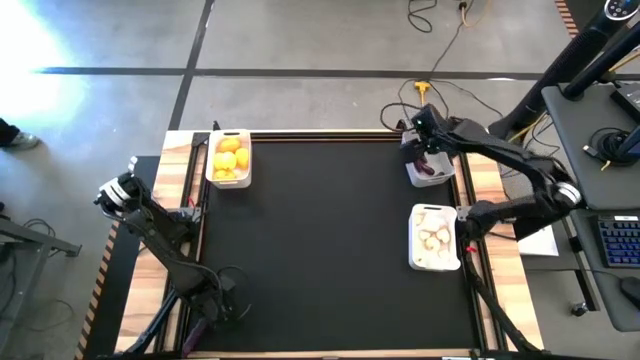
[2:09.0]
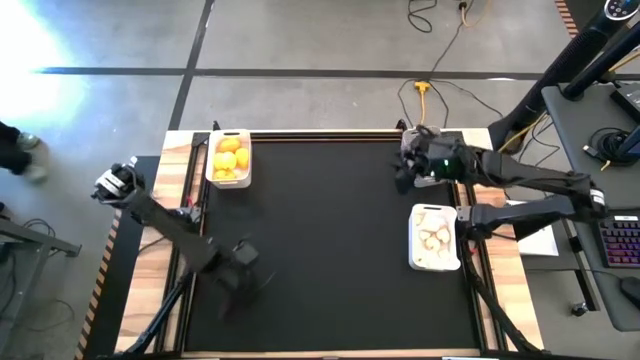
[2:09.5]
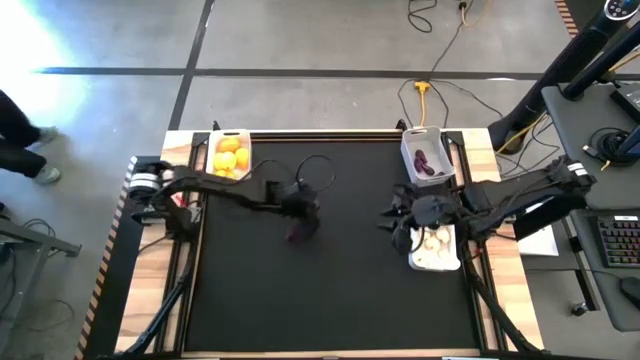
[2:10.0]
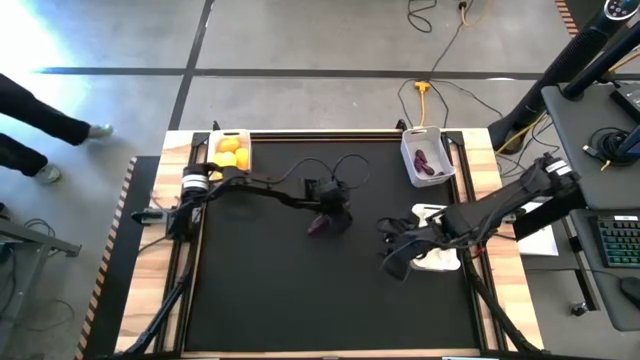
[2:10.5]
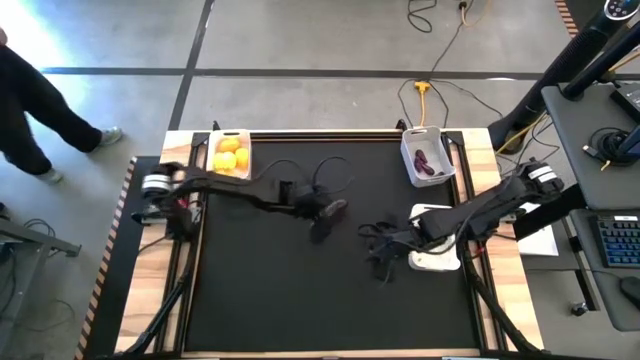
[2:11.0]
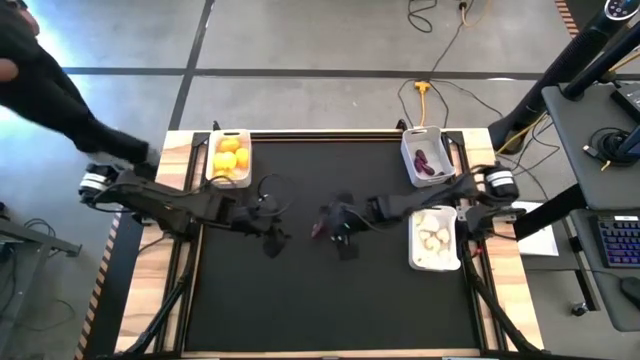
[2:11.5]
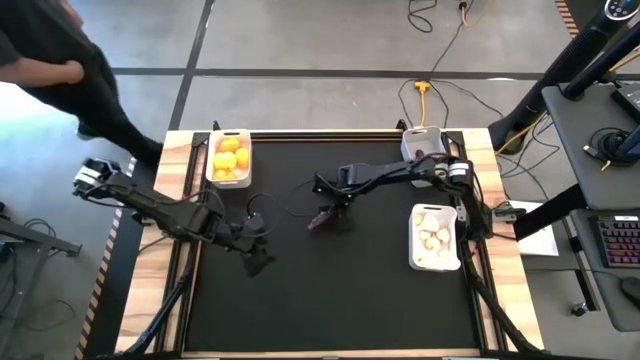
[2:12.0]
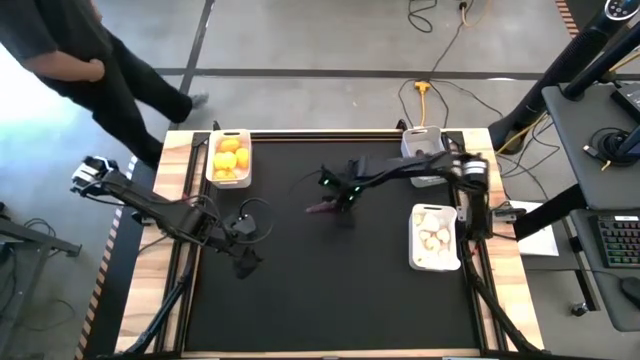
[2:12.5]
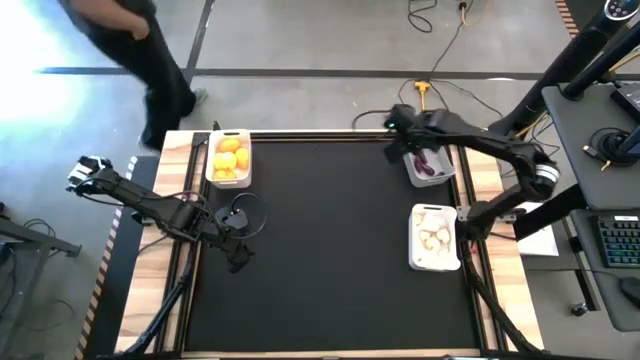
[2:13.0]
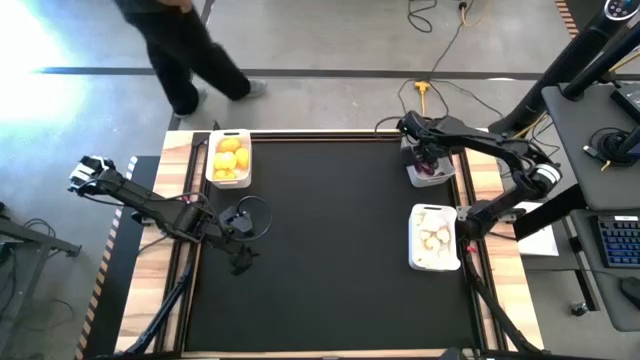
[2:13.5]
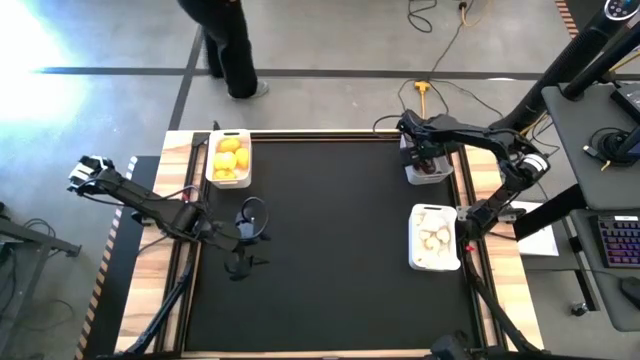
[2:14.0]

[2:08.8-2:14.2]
Task: Sort produce into baskets
Put the purple eggplant into the gray bin

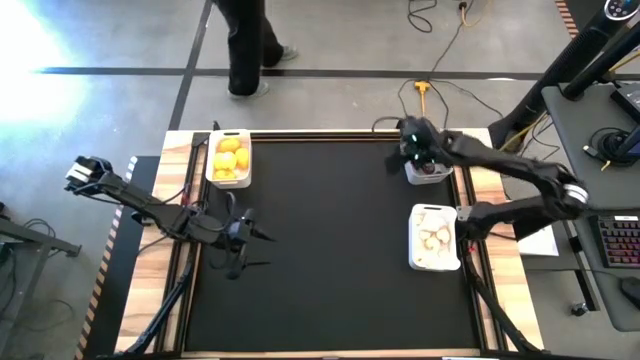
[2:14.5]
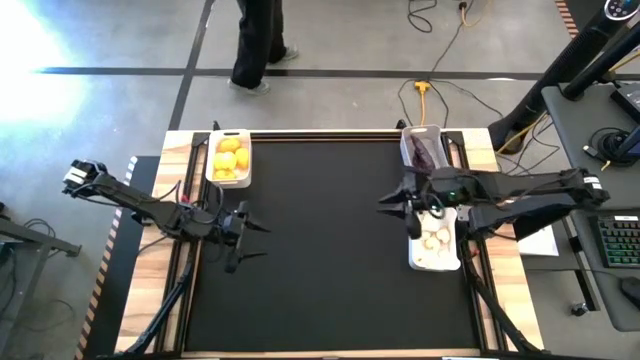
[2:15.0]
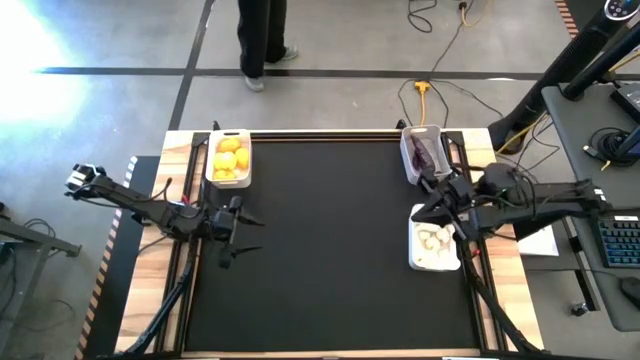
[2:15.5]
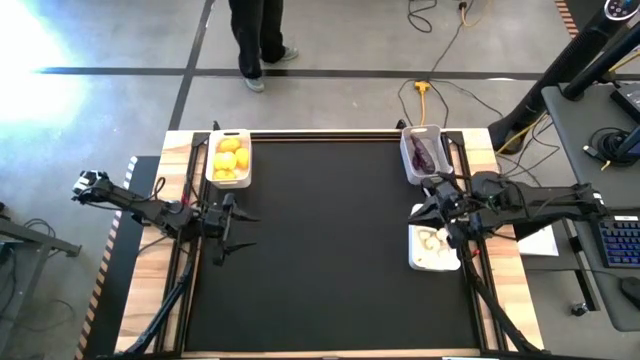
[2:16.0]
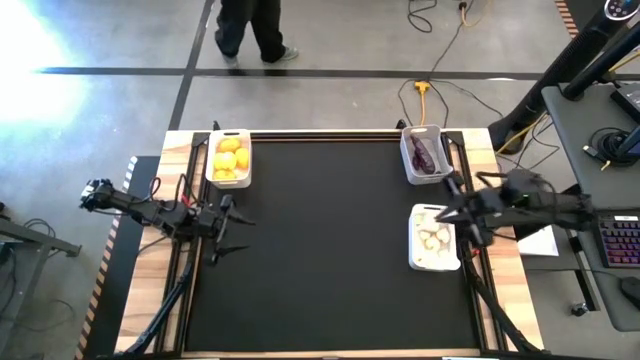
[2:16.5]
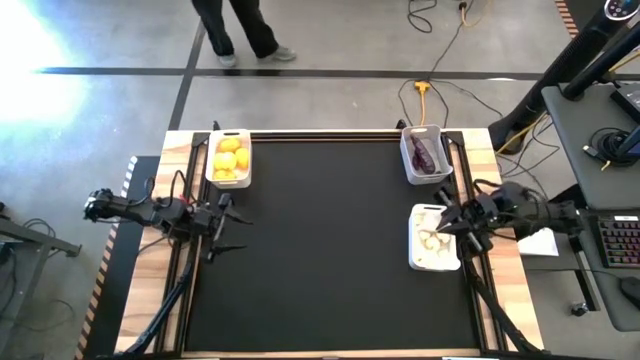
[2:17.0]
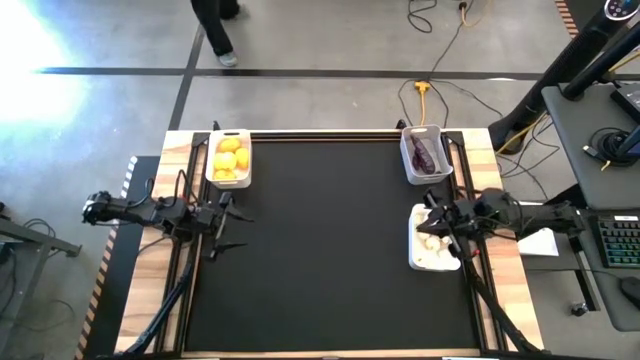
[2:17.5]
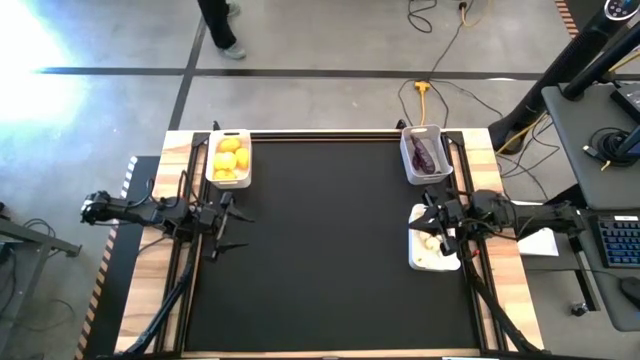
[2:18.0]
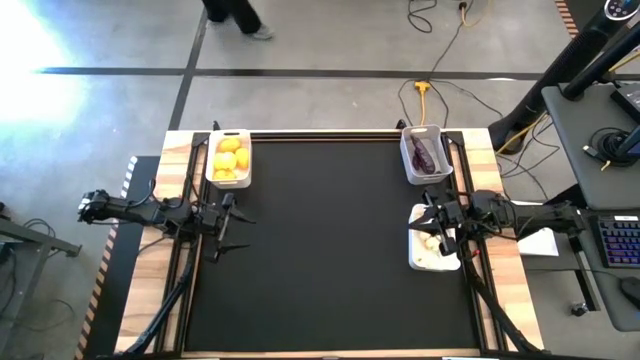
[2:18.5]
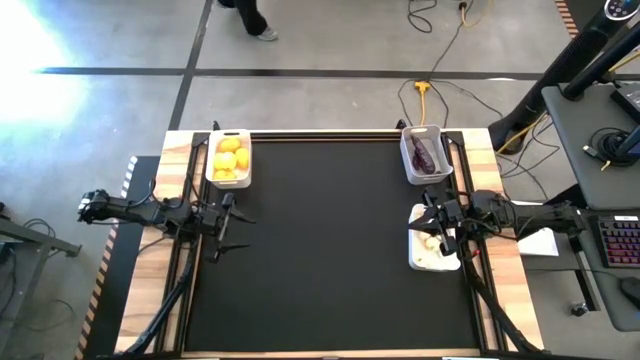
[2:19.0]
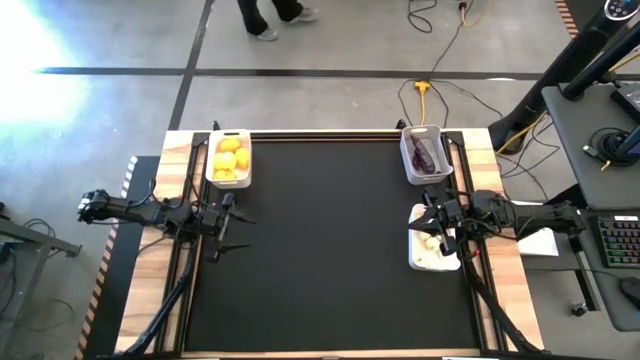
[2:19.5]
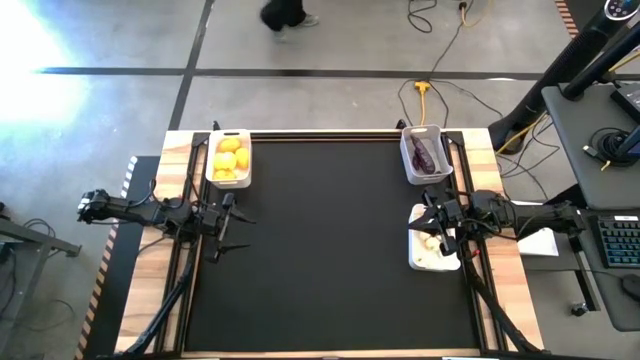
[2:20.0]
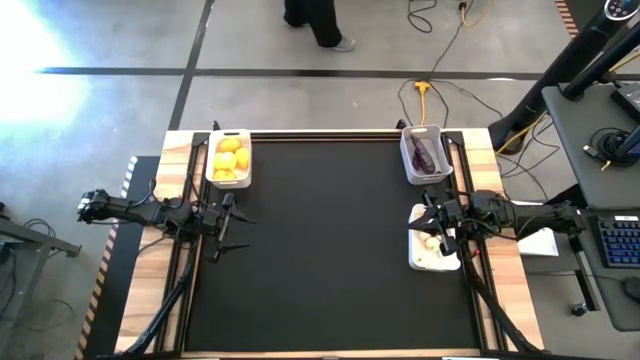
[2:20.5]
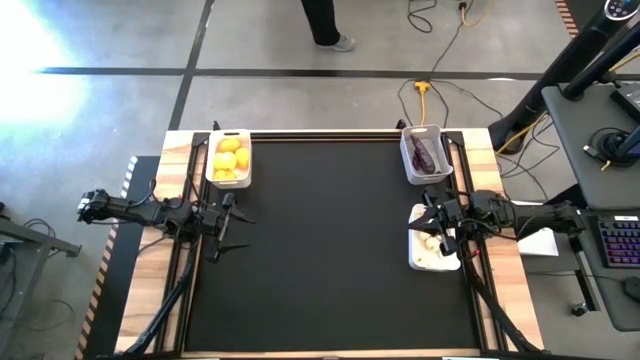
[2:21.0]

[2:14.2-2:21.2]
Return to Home Position

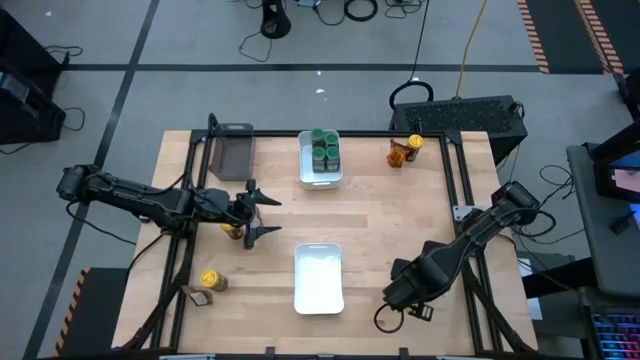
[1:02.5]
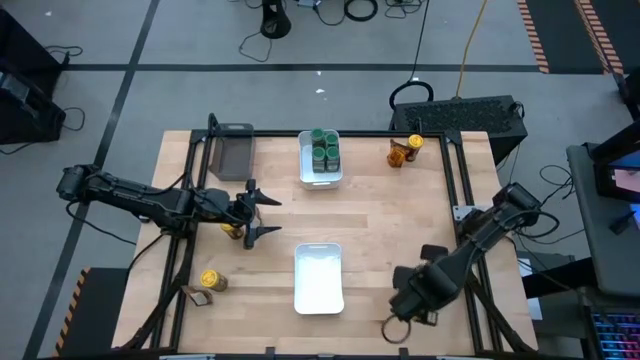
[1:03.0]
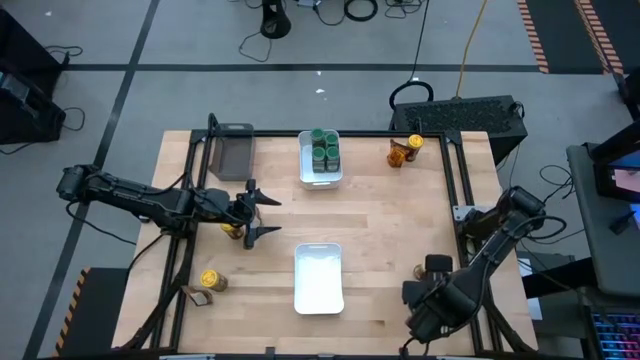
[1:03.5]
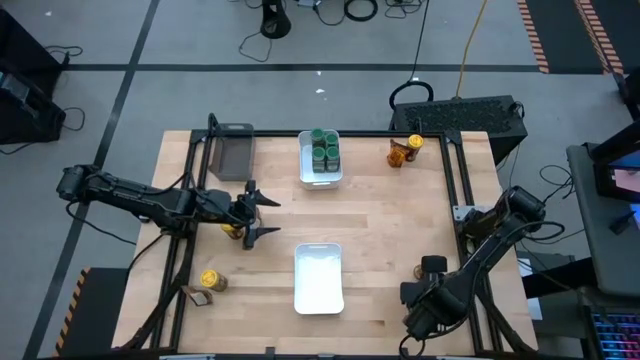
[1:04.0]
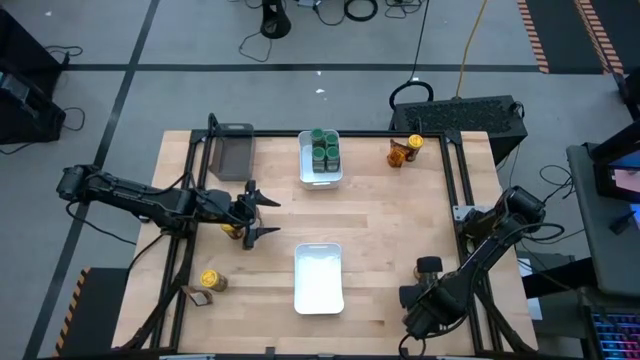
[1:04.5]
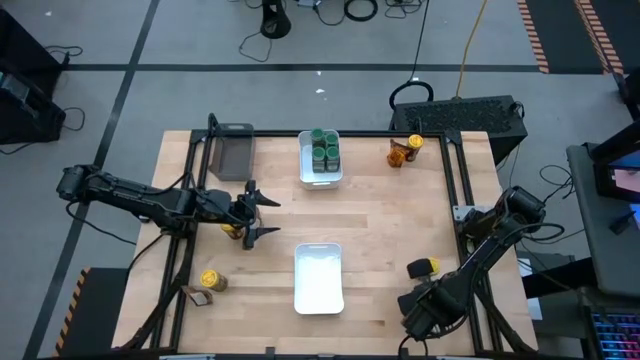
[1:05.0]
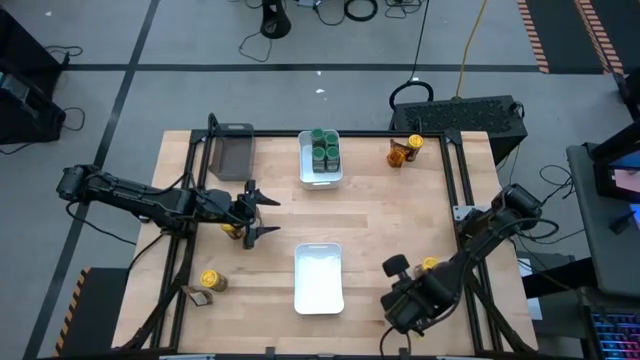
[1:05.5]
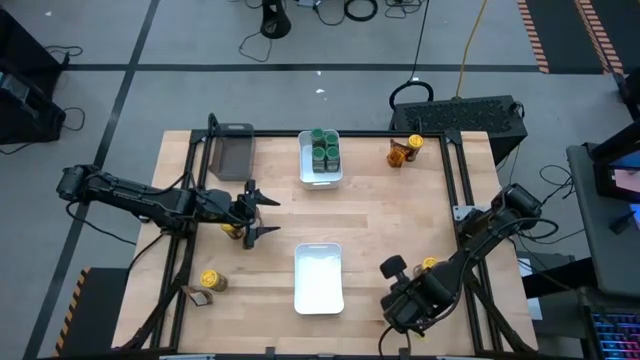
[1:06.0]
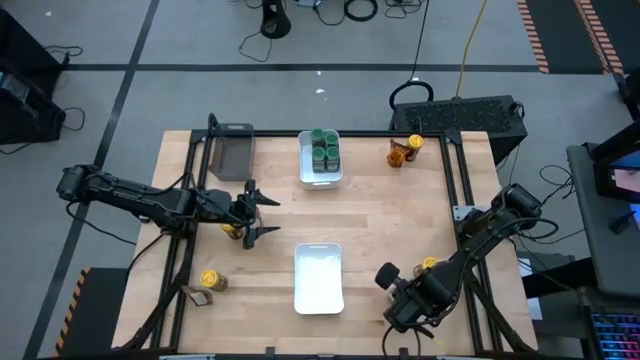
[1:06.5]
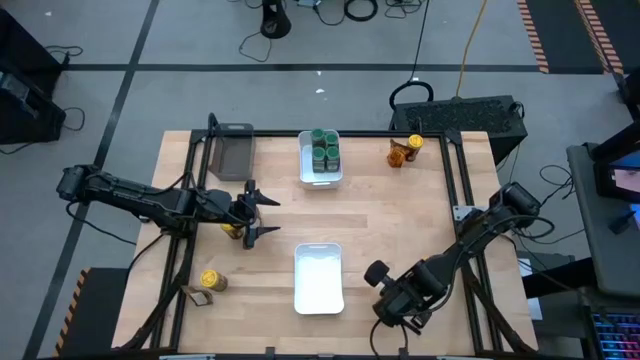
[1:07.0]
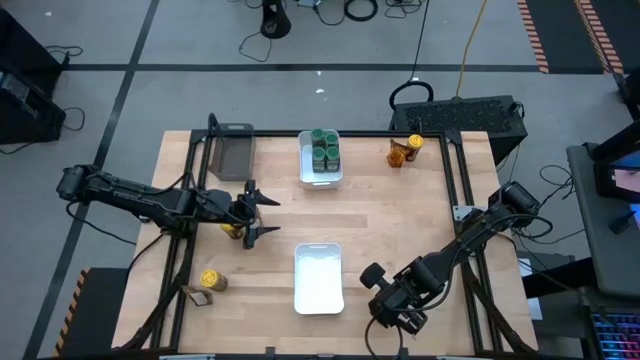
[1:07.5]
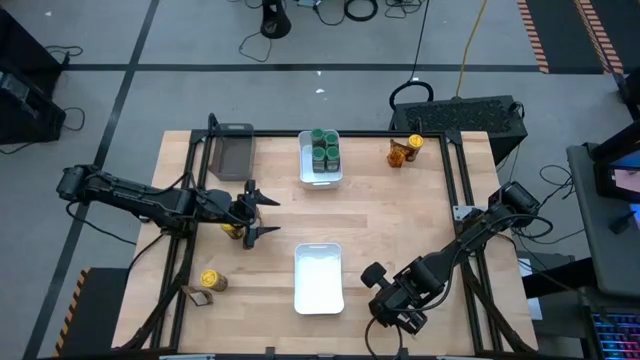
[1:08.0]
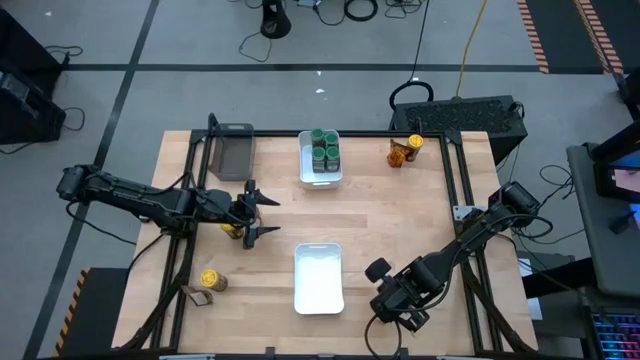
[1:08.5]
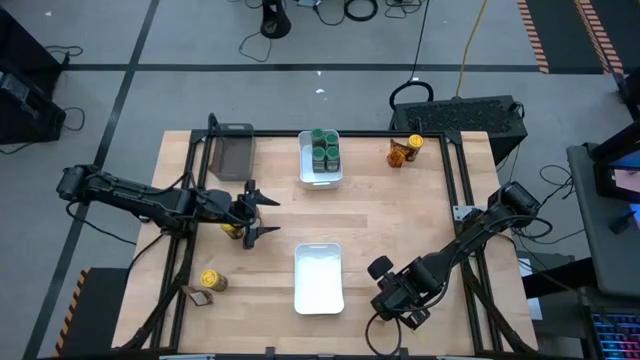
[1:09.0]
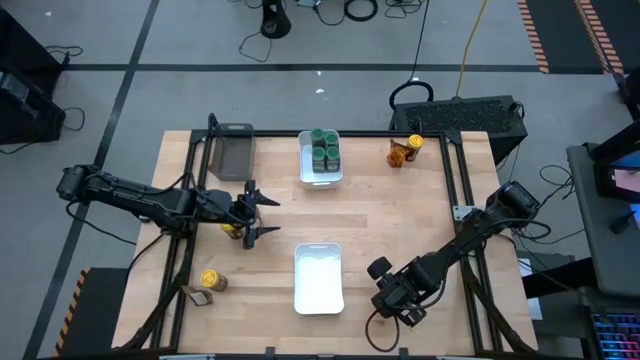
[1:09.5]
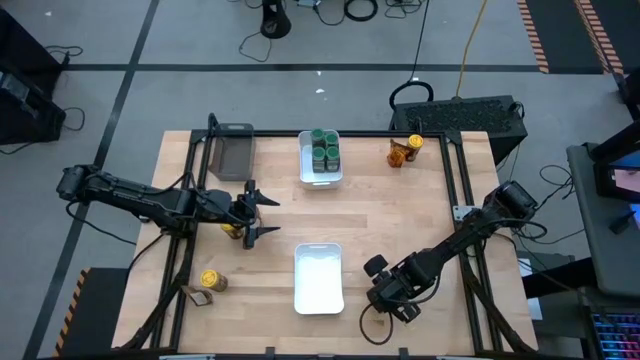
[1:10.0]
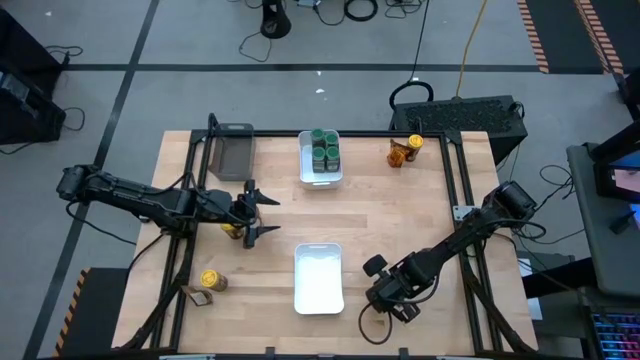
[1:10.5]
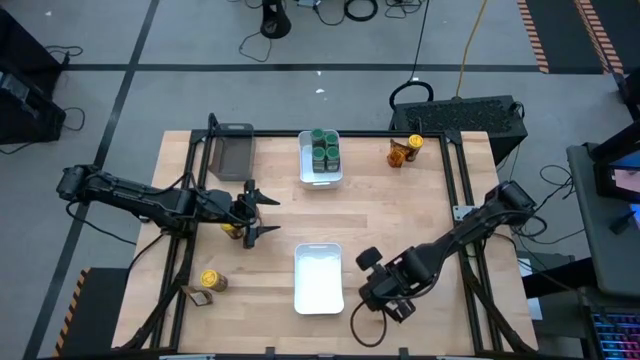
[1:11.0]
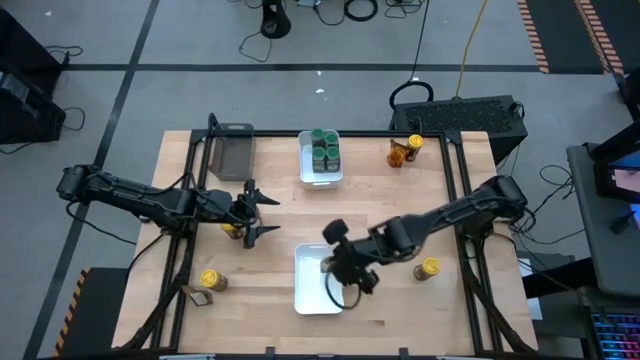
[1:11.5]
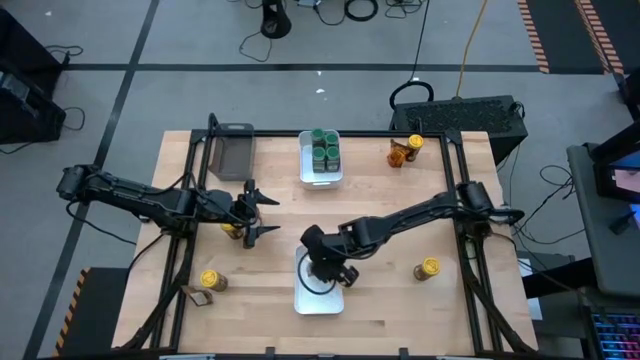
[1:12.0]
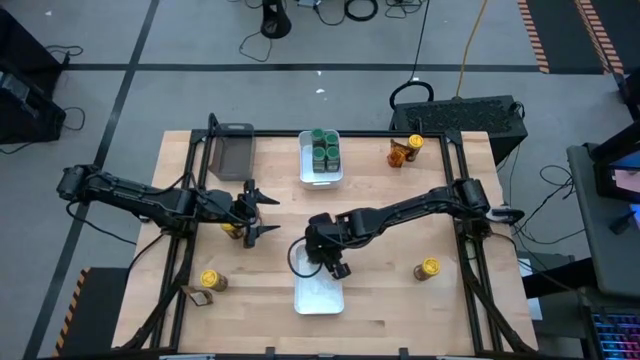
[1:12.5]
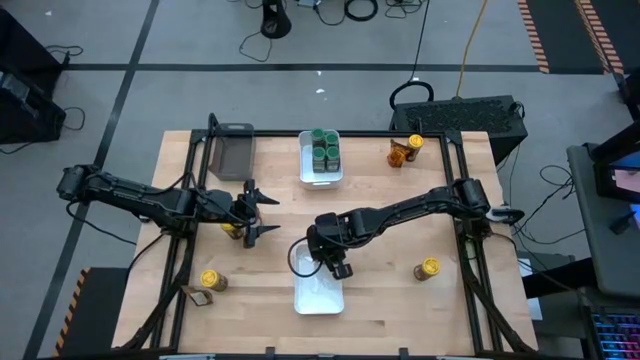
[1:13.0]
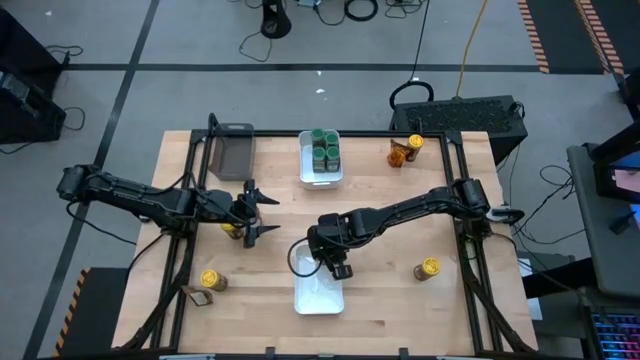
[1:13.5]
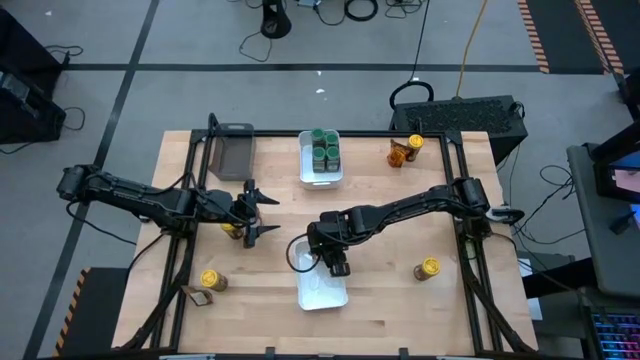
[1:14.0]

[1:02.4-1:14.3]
Task: Sort spices by type
Put the bottom right brown spice pack into the bottom white bin
